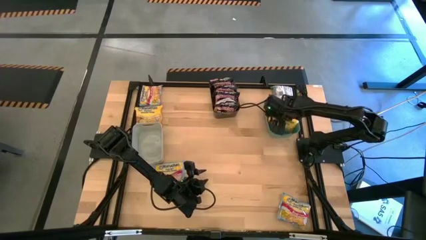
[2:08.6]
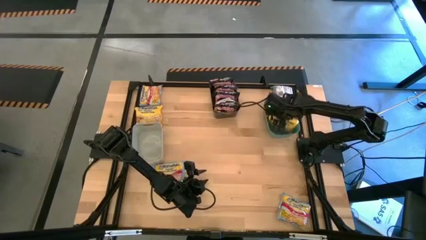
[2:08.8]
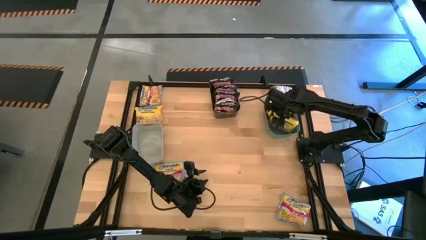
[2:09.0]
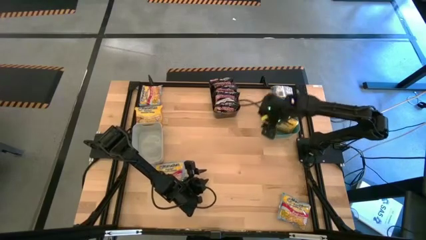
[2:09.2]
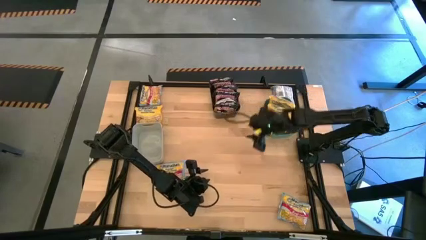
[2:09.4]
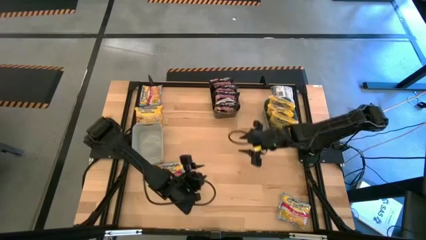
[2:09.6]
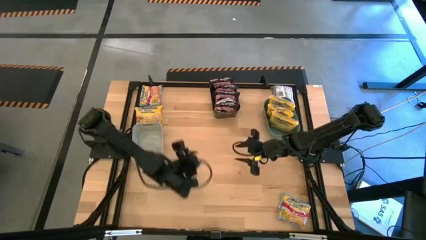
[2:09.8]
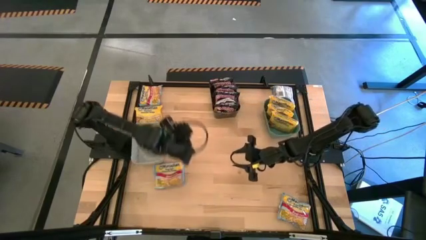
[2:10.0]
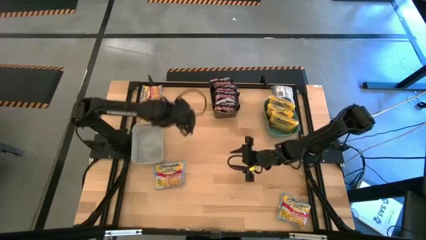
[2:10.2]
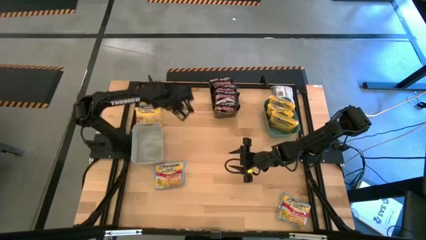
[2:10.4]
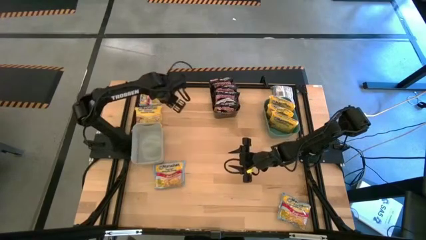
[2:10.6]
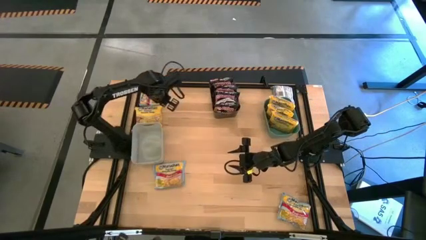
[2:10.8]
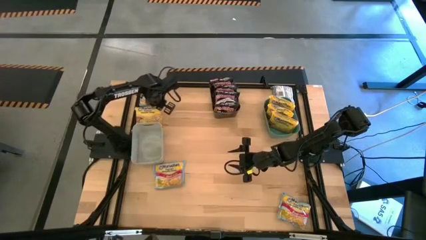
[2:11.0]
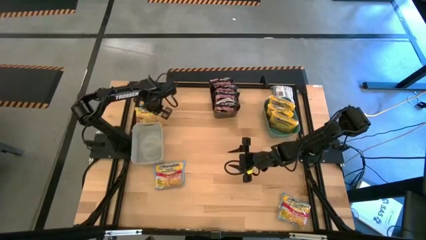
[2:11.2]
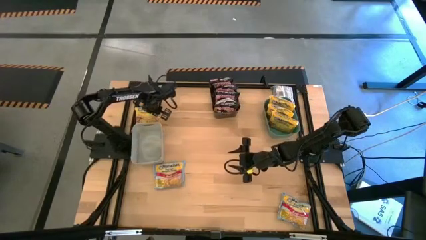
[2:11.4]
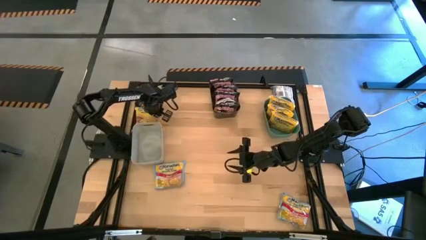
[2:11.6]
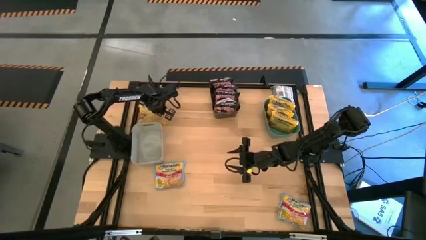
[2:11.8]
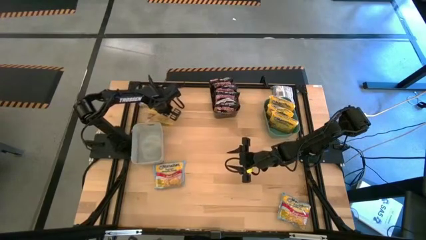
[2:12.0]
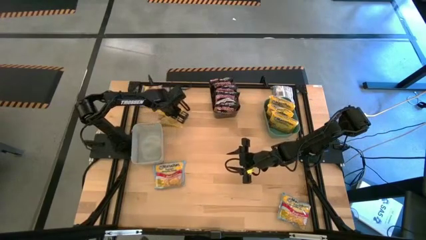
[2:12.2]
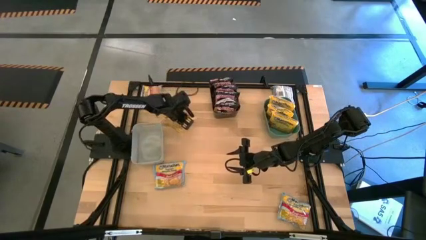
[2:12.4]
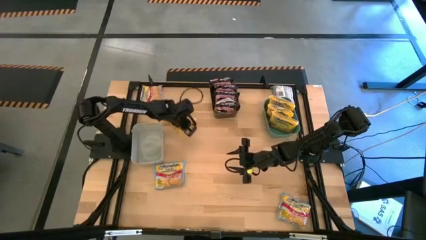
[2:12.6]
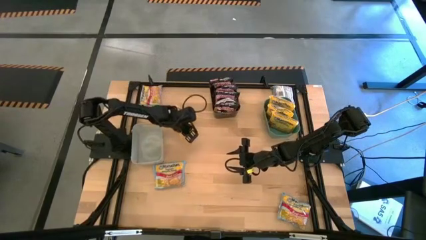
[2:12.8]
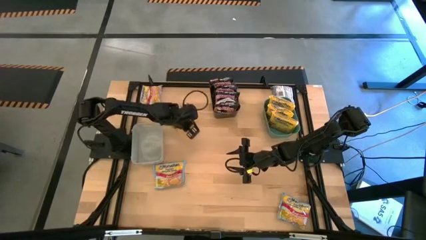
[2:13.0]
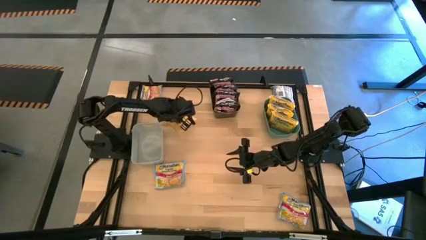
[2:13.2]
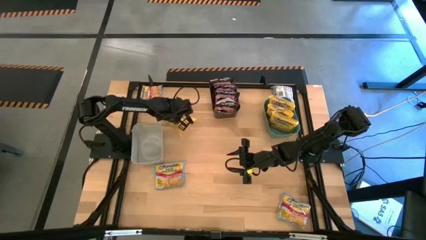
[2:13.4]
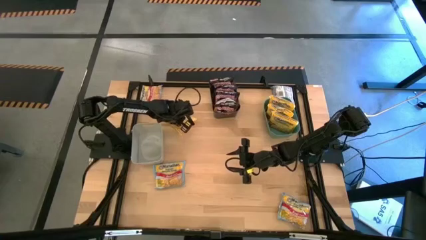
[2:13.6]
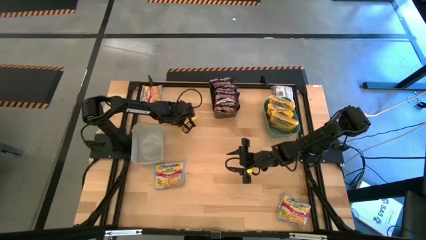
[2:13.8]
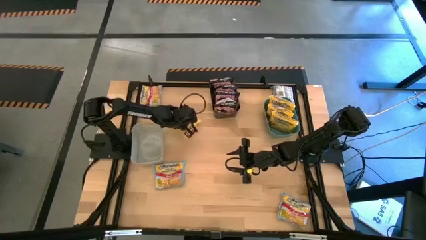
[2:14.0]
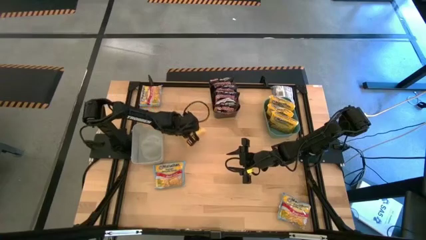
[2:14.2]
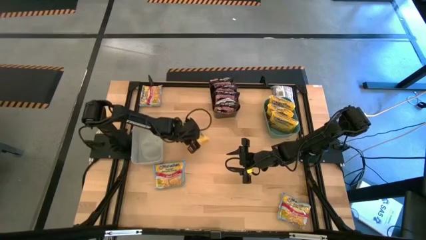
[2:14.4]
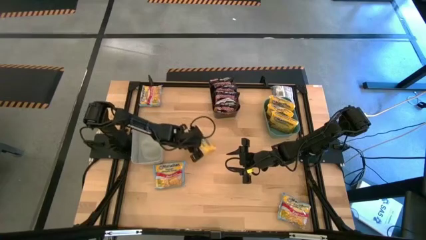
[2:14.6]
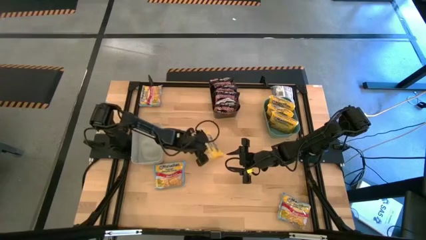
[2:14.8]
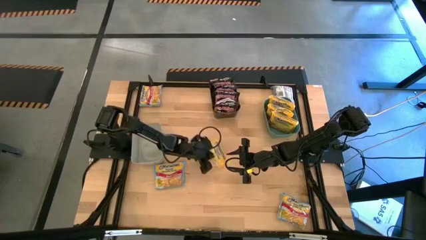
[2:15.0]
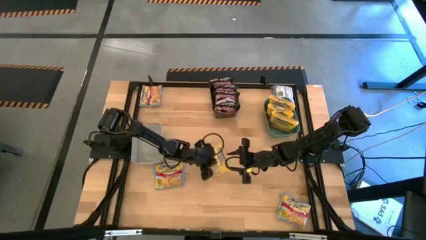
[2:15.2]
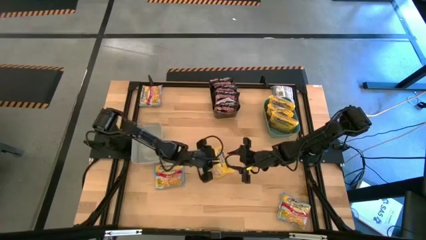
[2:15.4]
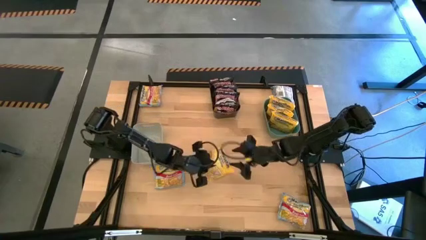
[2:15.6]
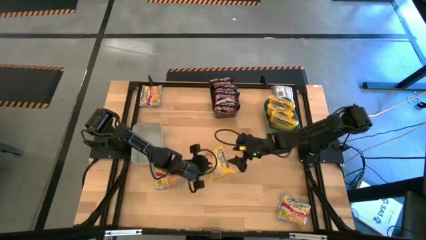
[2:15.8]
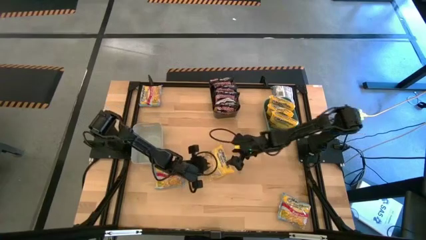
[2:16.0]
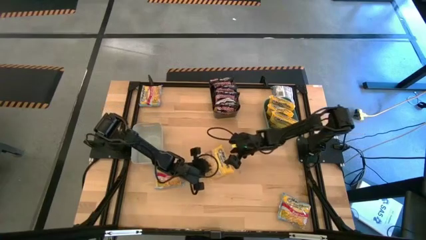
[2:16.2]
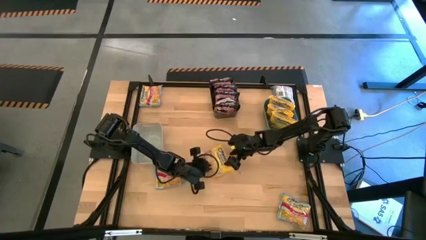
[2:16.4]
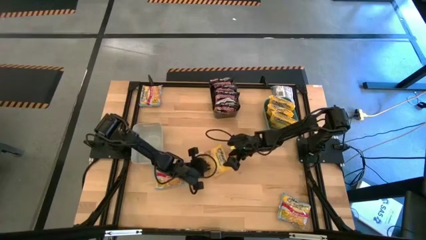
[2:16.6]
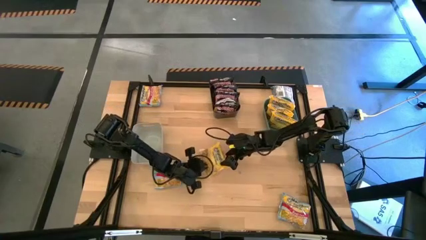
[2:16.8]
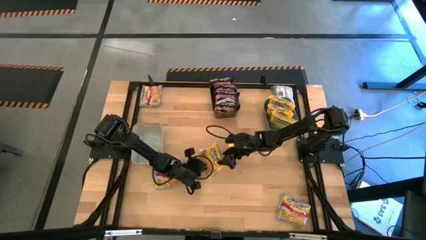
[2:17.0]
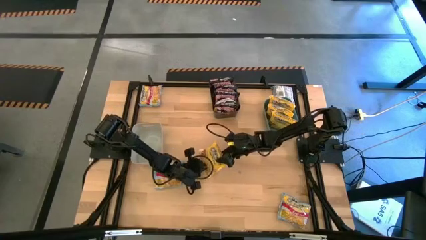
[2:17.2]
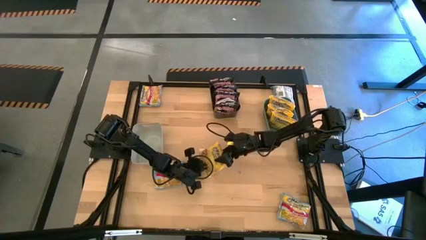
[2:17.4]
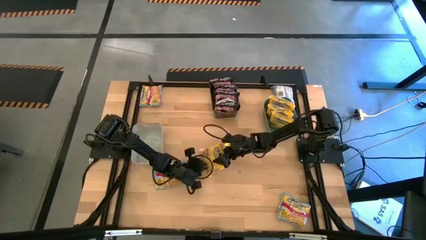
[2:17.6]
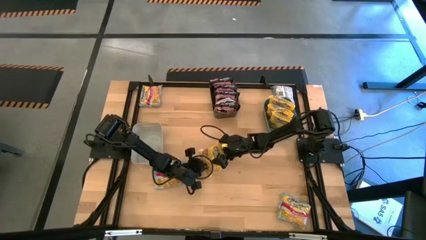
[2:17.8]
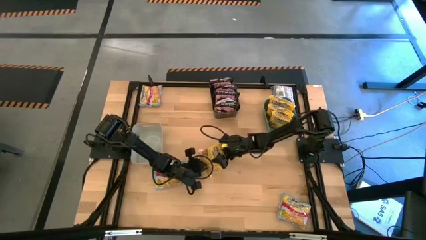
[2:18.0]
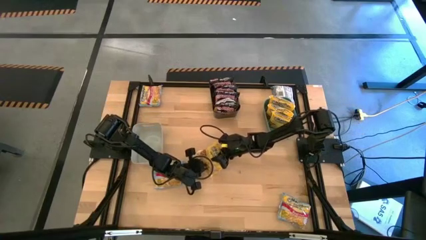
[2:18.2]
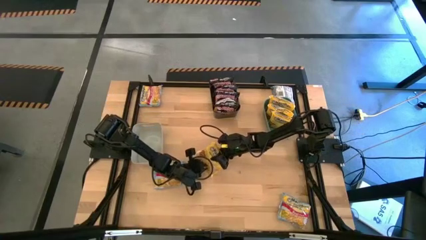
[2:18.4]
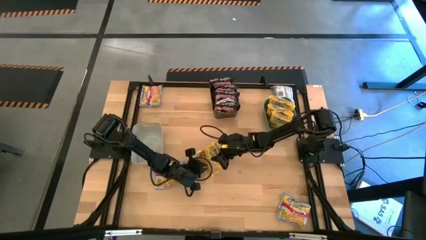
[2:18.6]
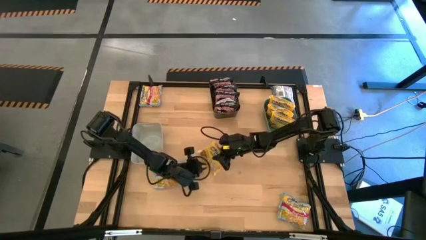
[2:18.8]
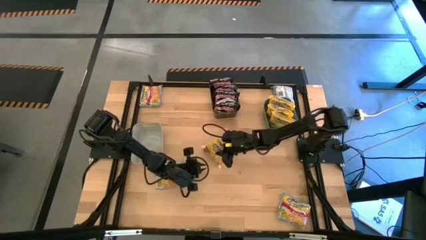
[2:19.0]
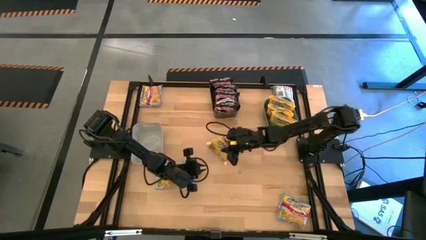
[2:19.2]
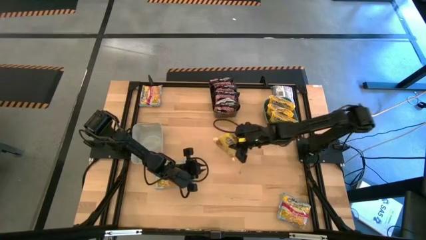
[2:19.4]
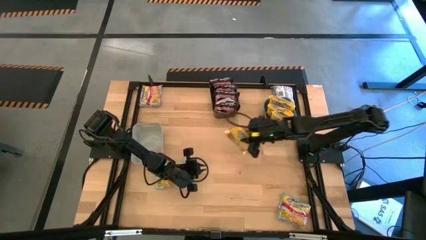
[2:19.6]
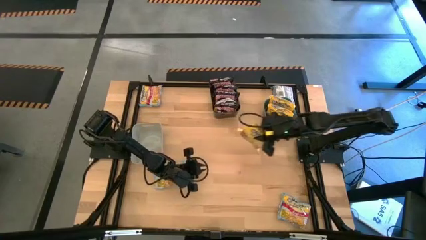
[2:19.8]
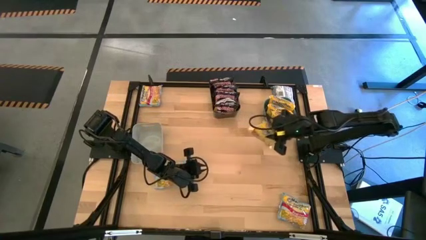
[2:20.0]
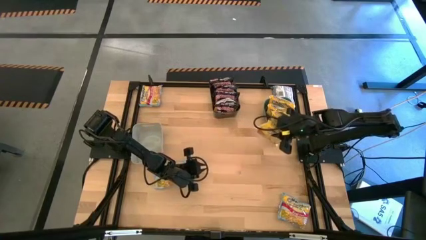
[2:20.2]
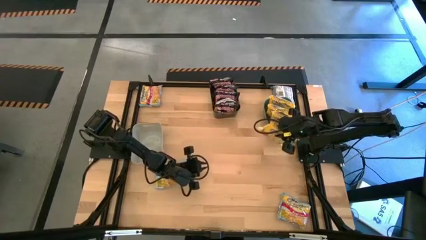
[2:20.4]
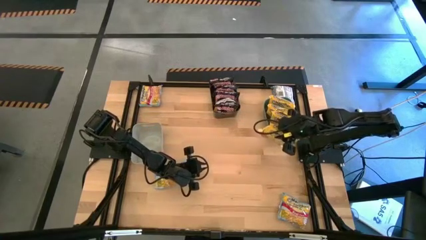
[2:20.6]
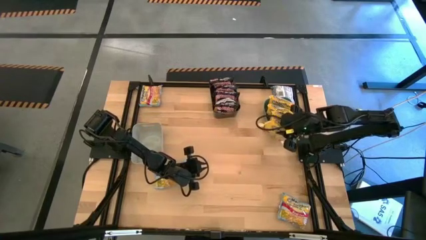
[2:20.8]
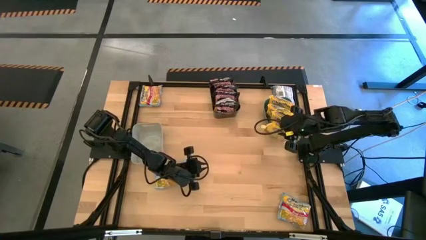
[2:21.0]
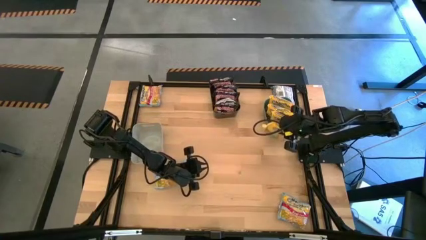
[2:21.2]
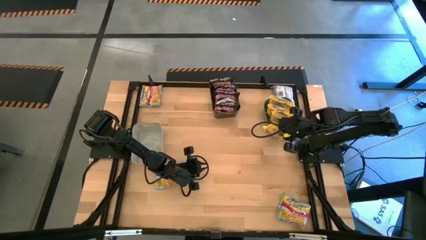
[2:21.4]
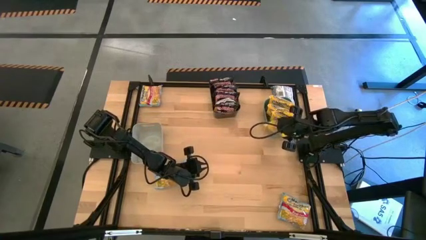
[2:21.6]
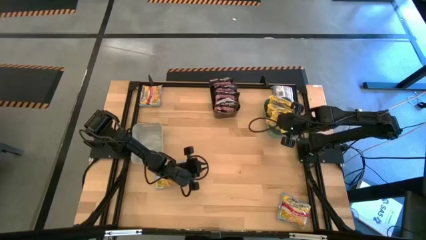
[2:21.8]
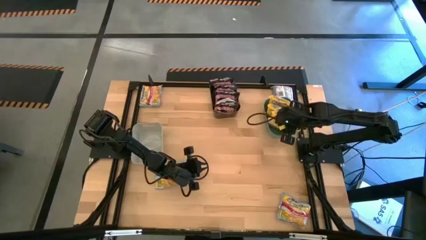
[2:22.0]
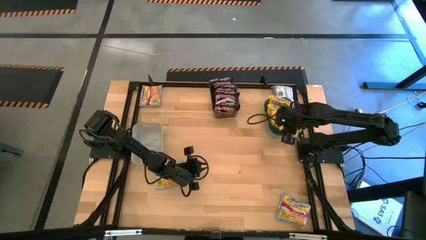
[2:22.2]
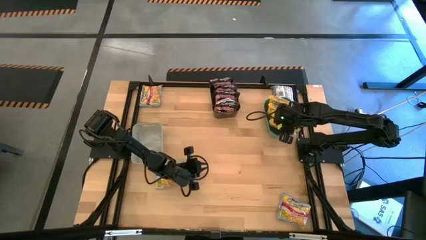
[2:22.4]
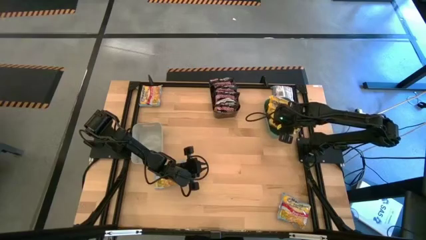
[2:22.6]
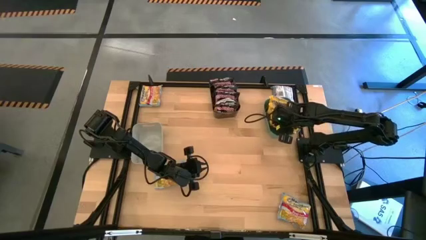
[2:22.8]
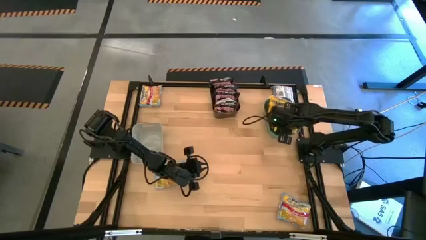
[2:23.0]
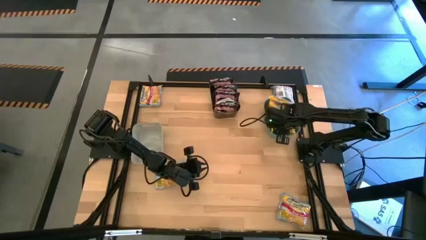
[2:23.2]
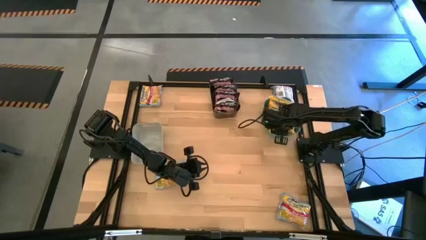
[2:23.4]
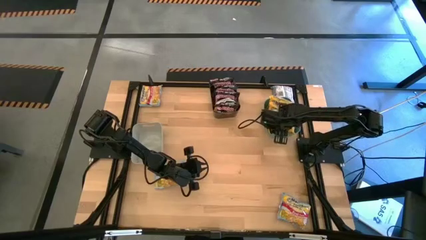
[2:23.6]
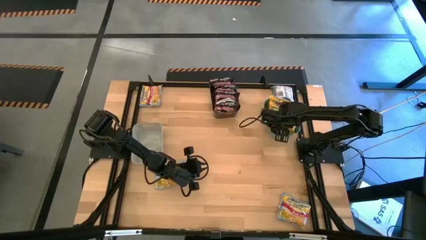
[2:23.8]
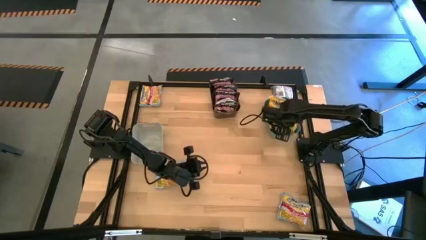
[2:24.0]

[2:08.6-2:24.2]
Task: Sort Maruchan noodles
Put the yellow noodle pack into the blue bin
